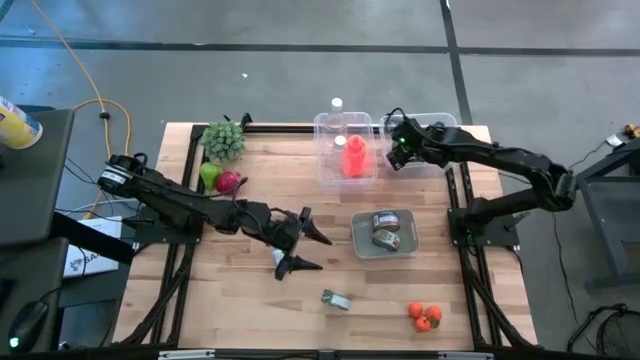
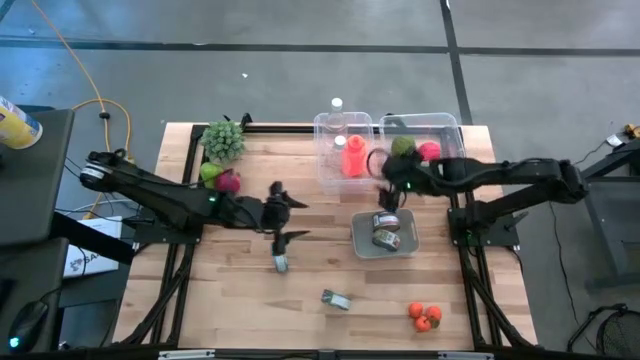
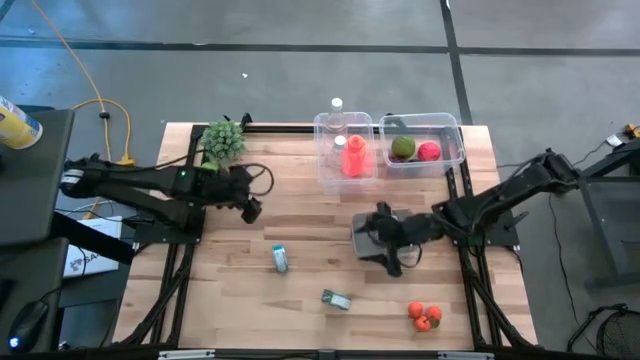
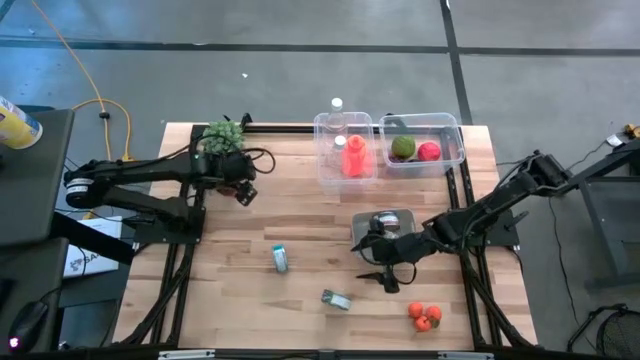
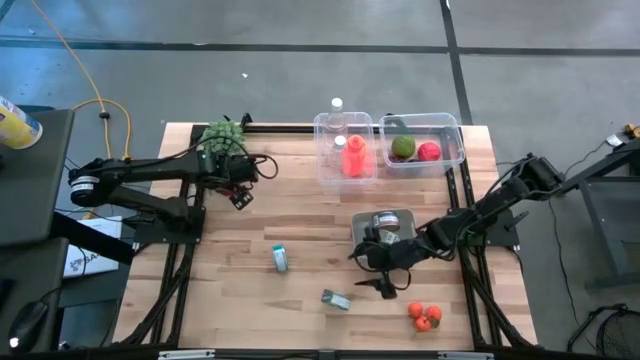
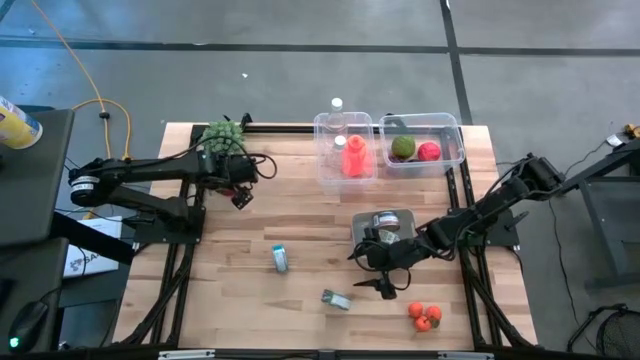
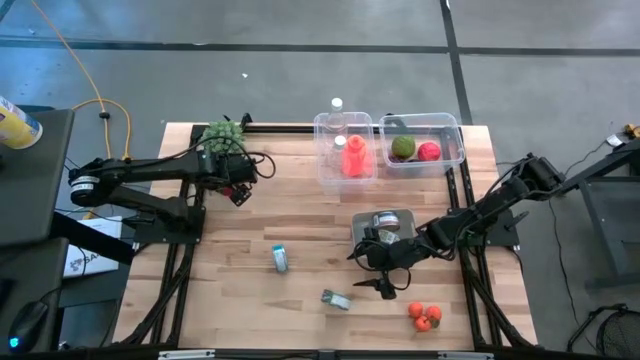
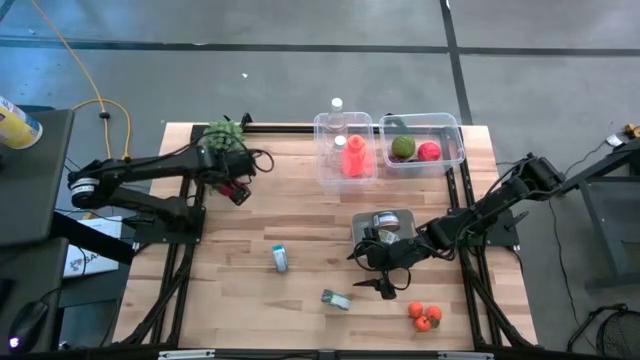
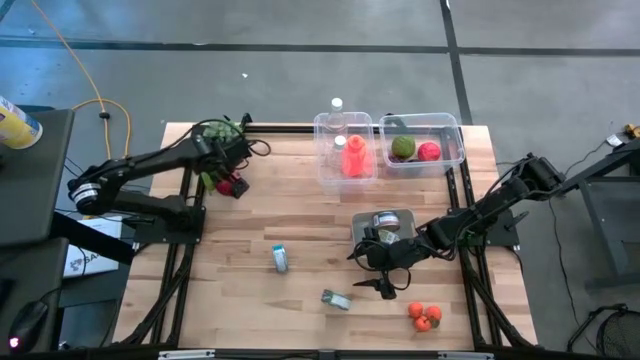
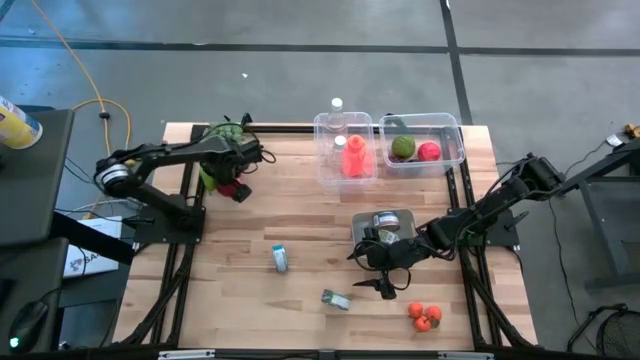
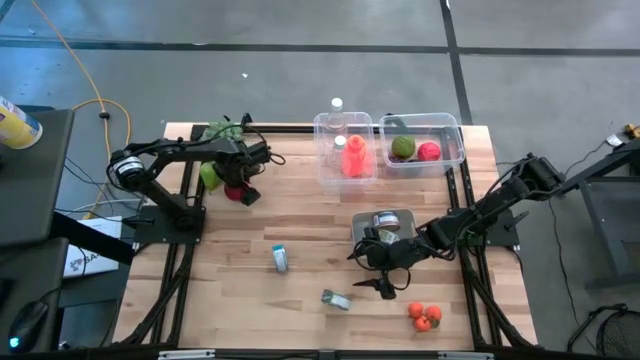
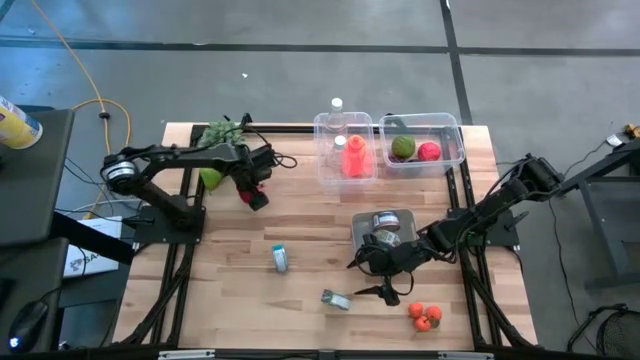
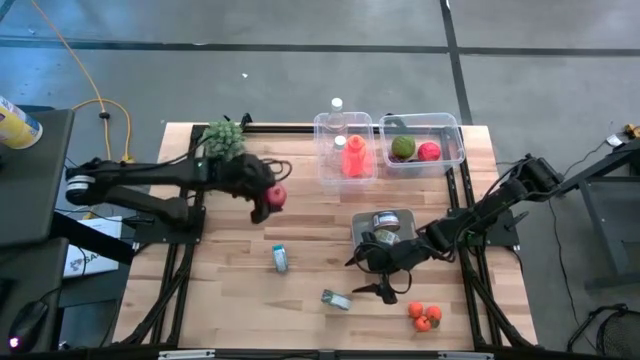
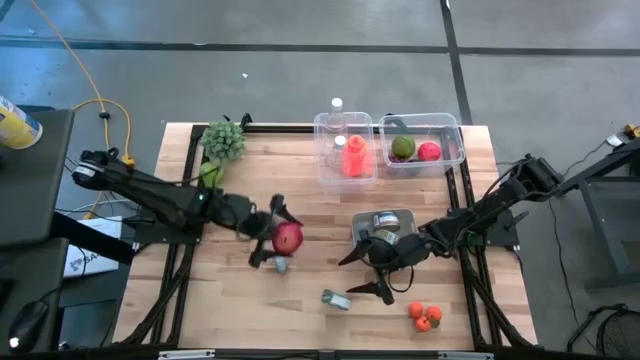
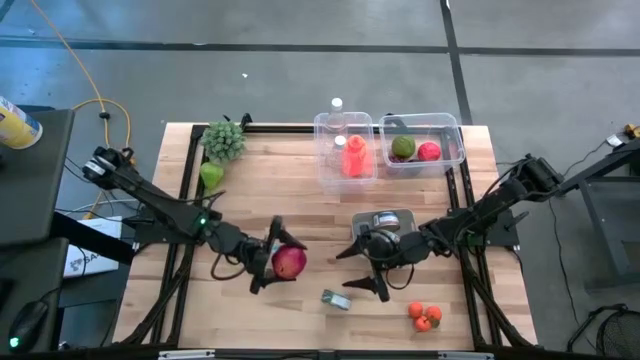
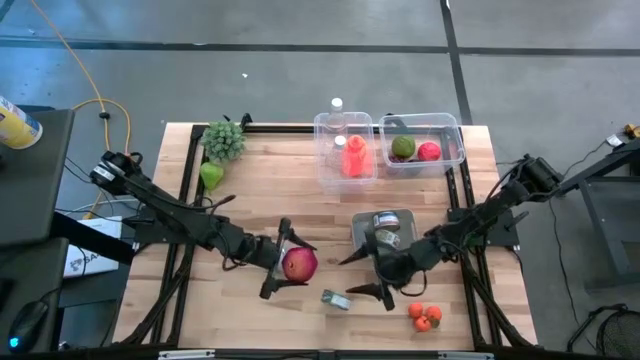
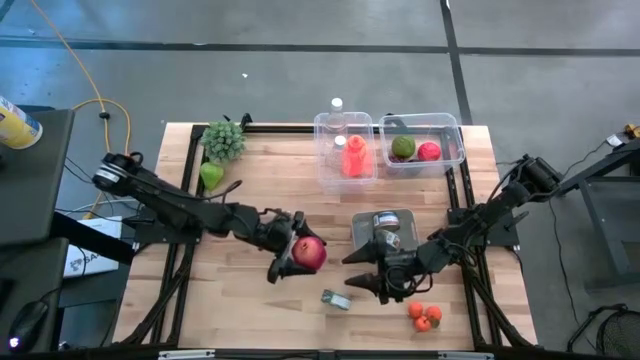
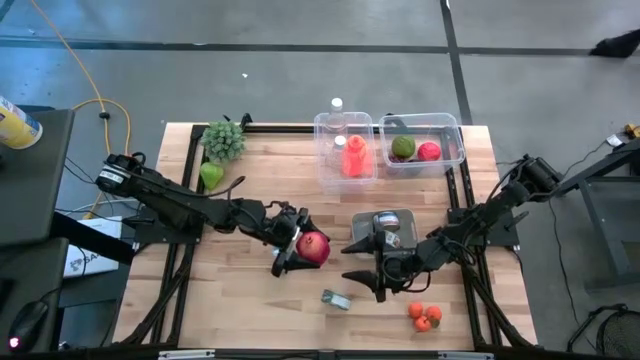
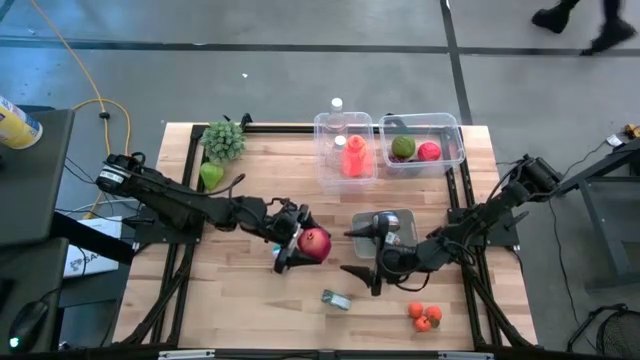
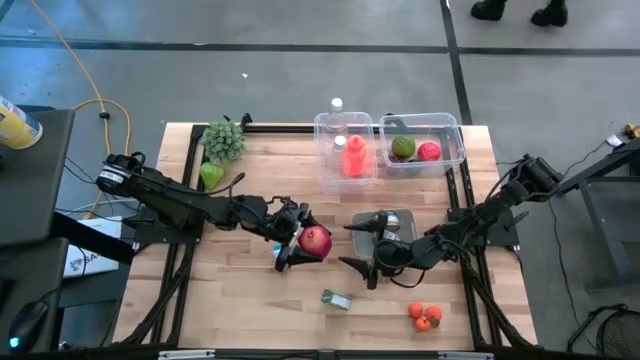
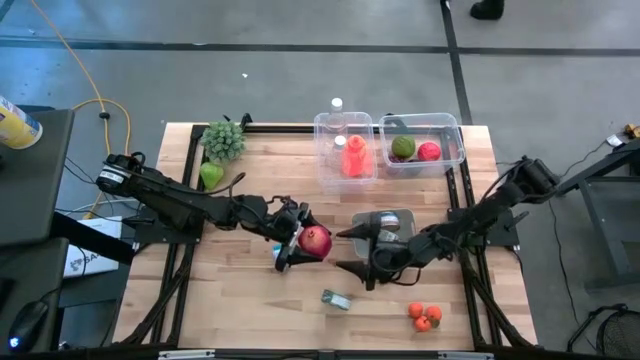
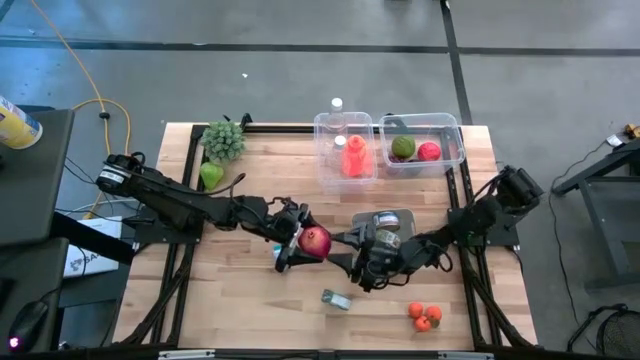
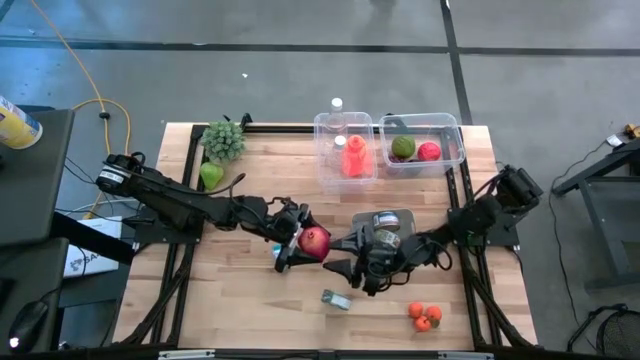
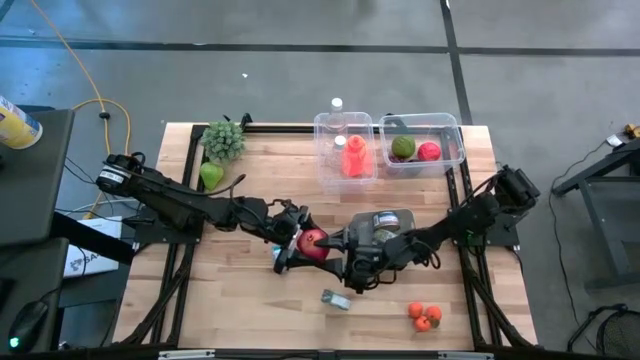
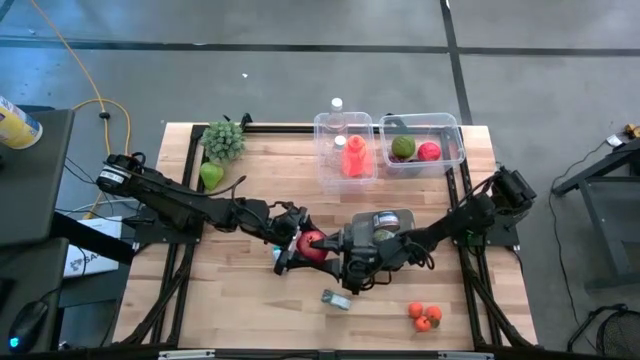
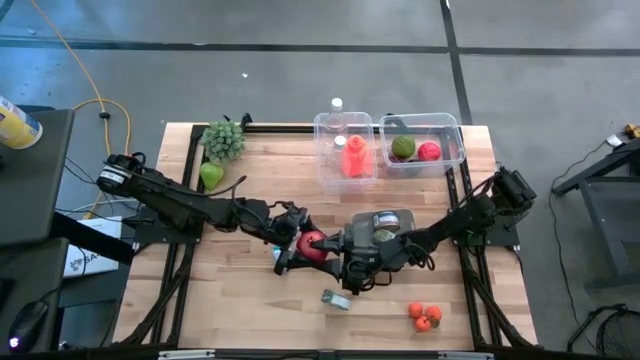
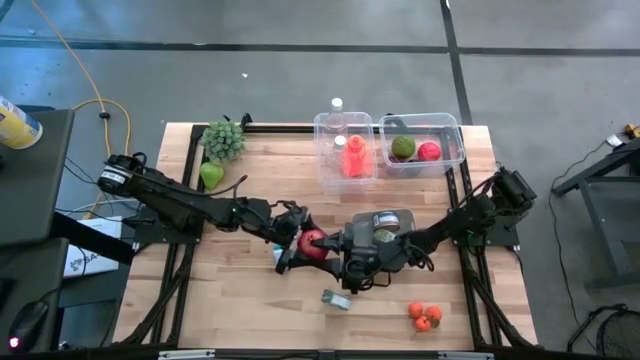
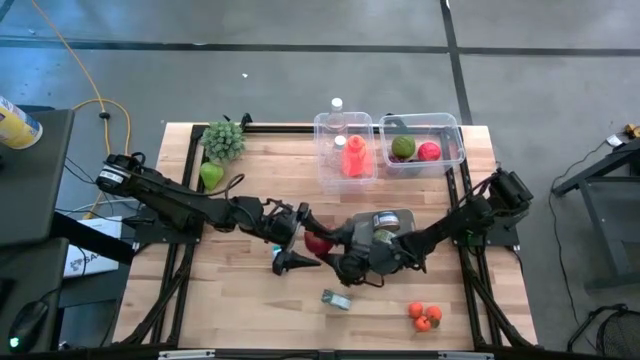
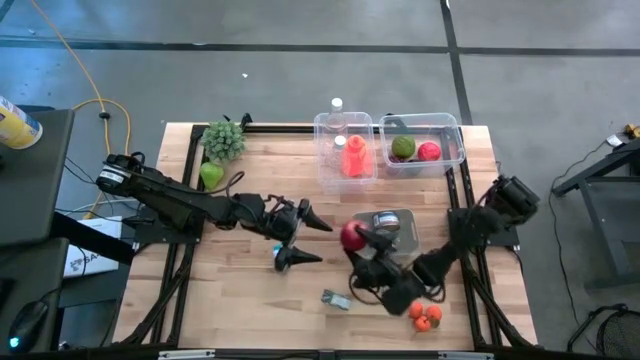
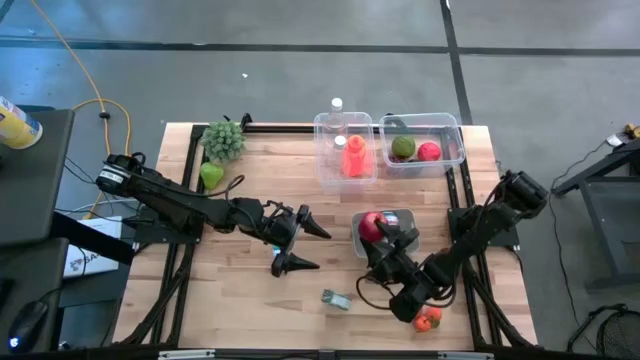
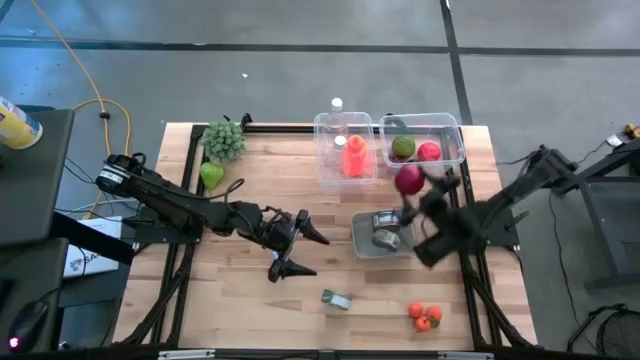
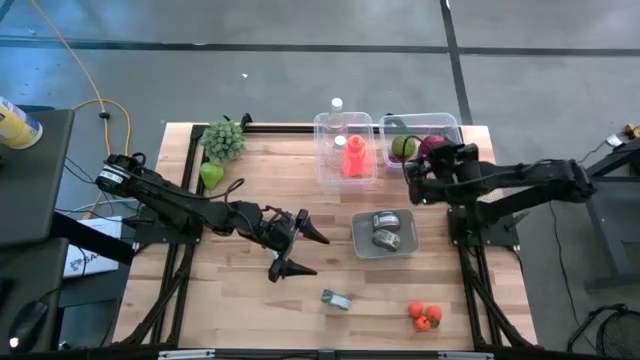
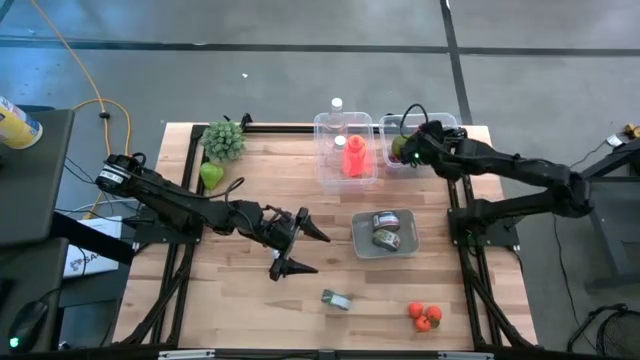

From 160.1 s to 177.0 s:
Task: Pick & Place Food Item
Put the pomegranate into the right transparent bin

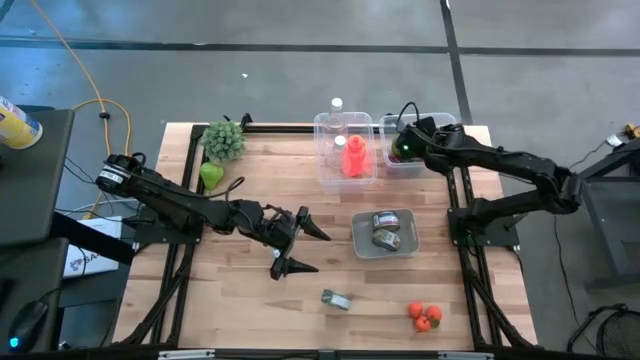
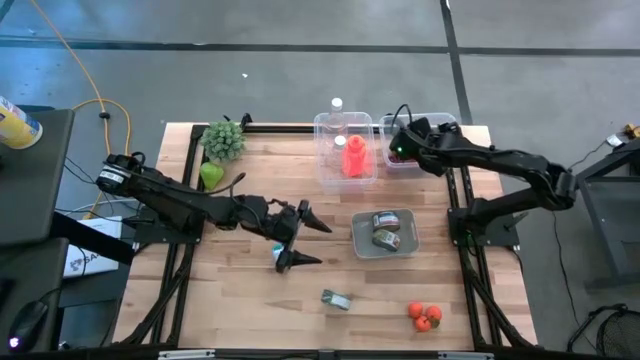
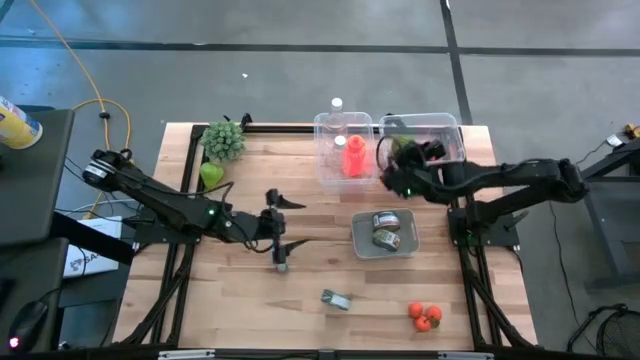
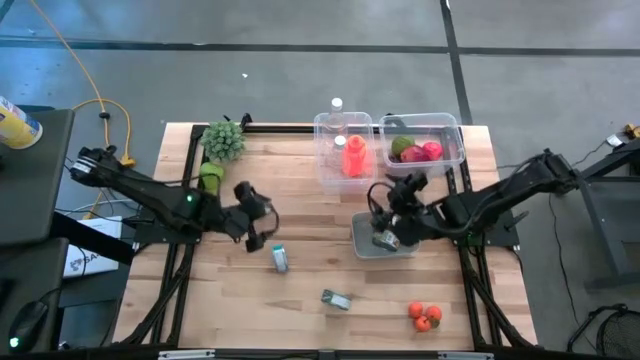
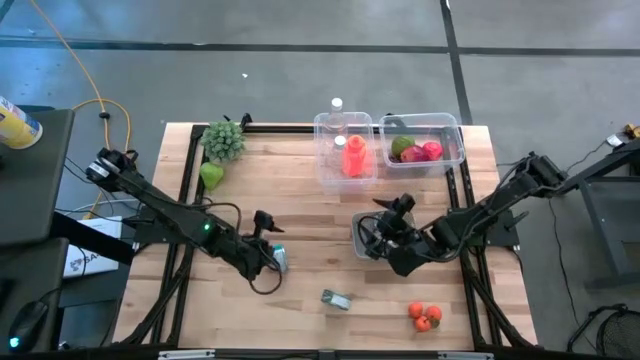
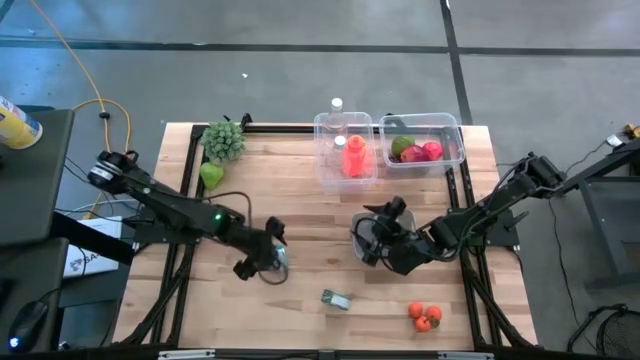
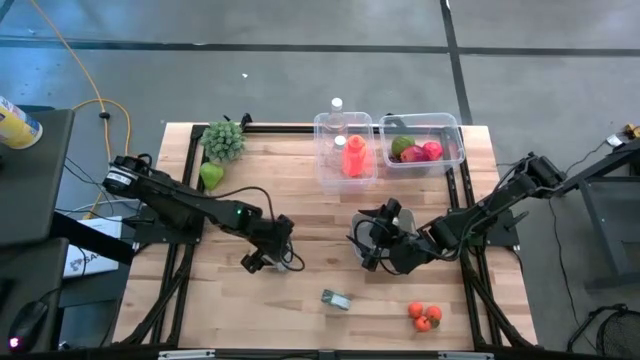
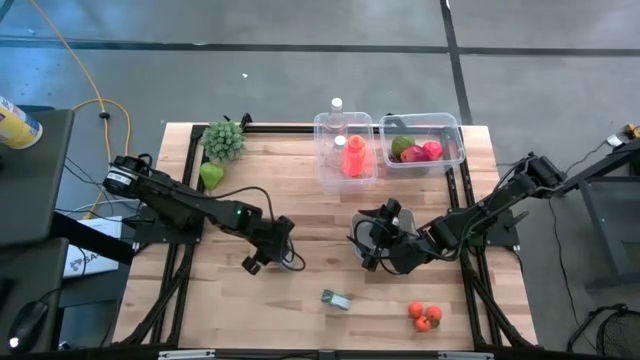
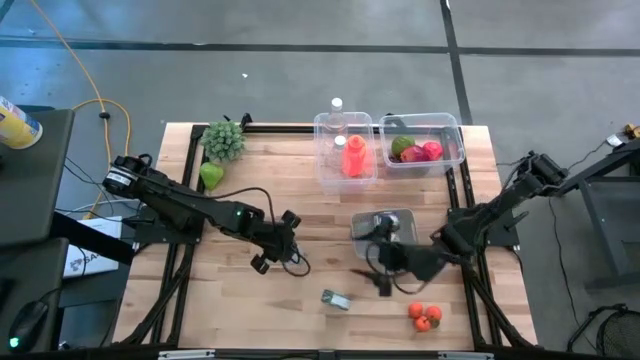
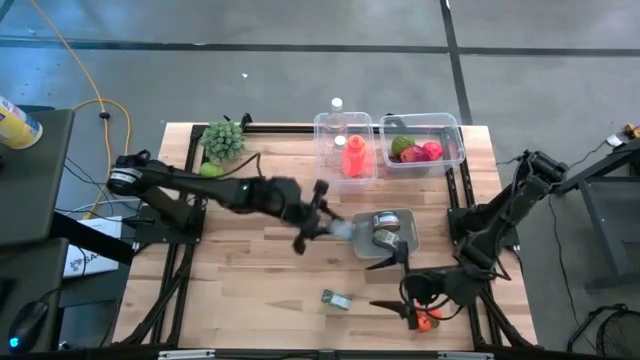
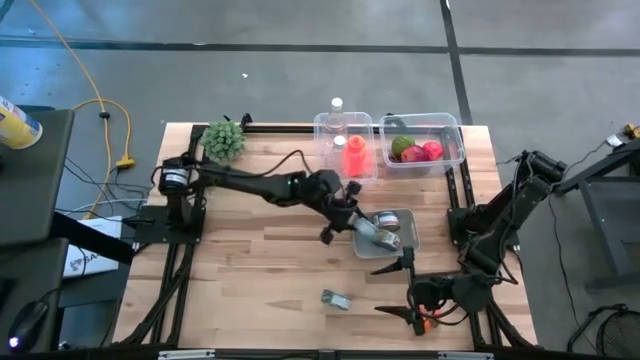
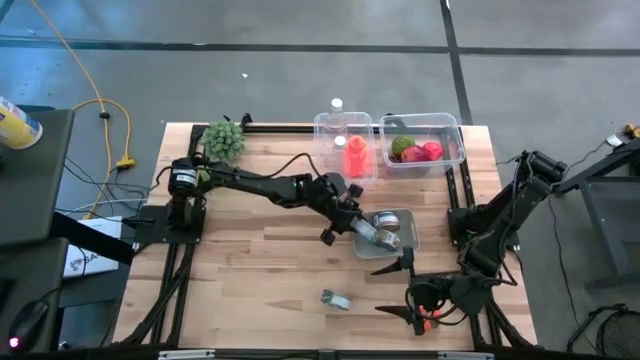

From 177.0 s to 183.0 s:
Put the blue tuna can into the gray bin
